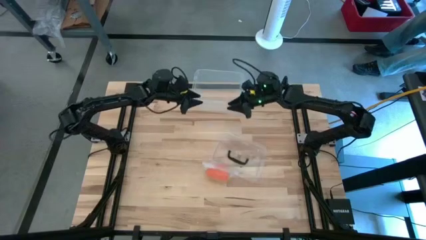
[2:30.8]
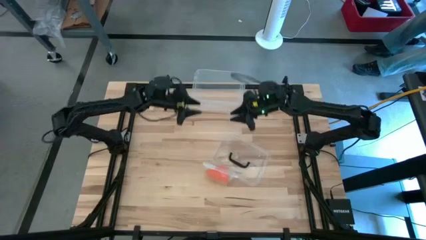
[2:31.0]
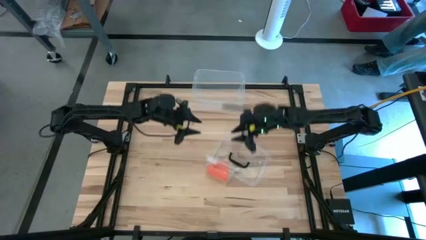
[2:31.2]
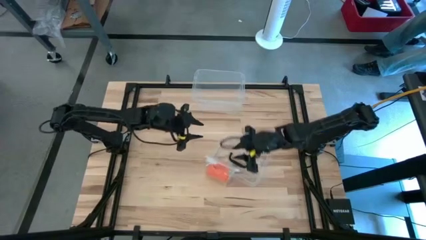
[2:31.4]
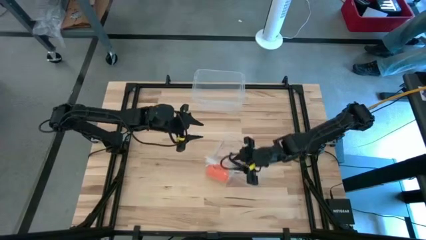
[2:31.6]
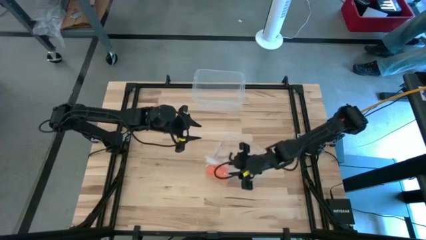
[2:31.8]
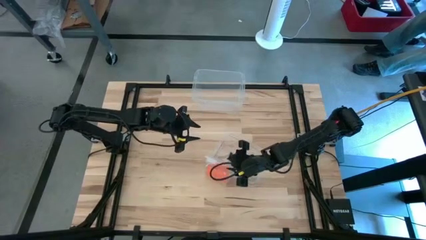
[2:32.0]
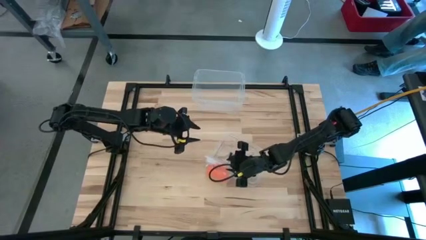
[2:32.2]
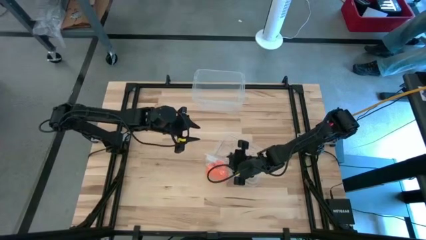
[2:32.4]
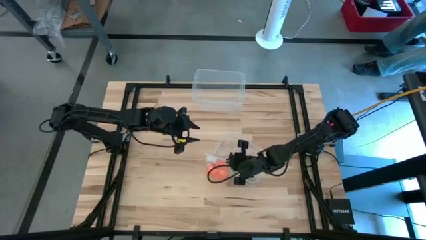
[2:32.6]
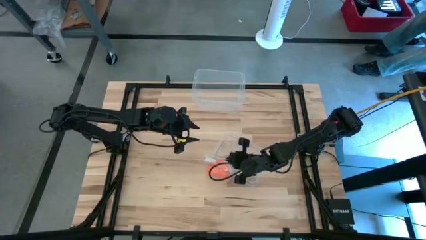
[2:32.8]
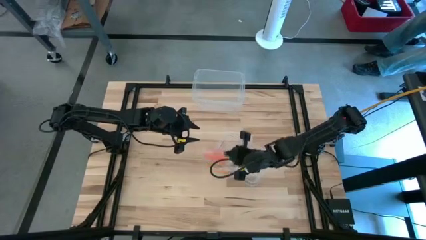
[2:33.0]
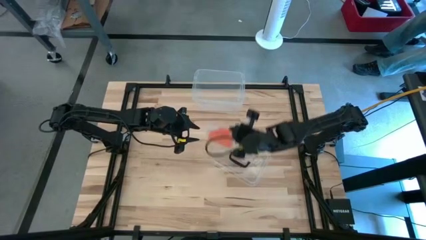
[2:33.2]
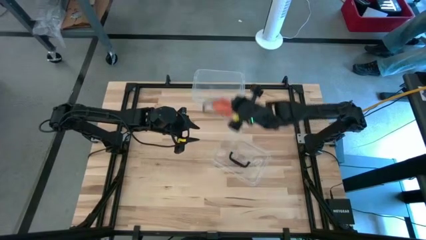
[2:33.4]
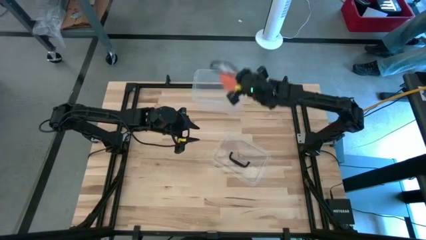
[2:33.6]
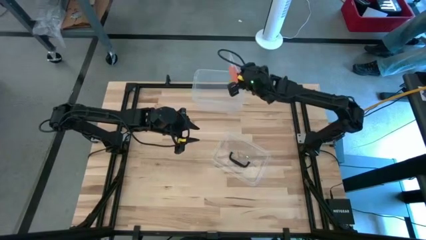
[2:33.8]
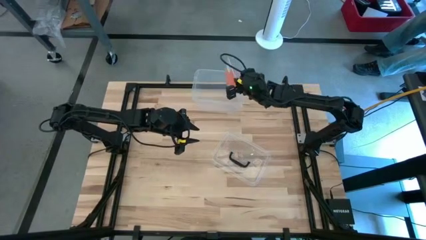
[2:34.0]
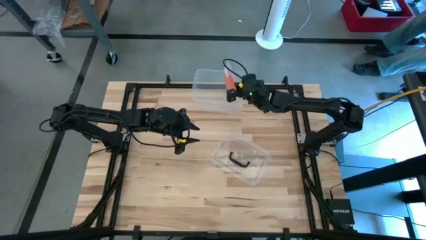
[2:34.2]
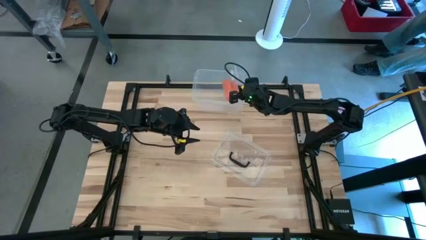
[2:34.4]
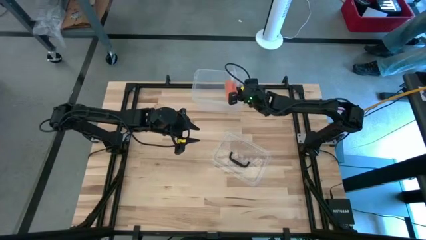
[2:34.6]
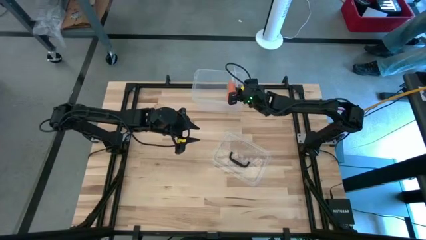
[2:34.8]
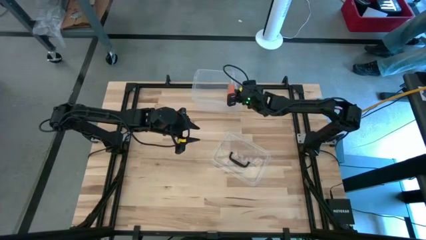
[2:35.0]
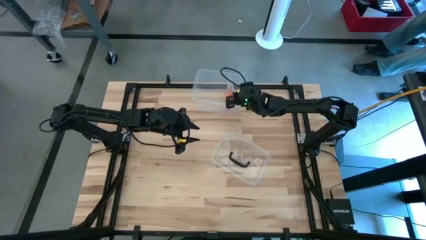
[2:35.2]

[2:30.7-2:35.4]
Task: Roll bandage
Put the package bandage into the transparent container

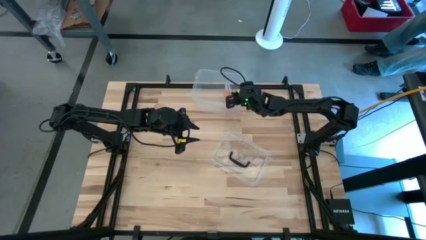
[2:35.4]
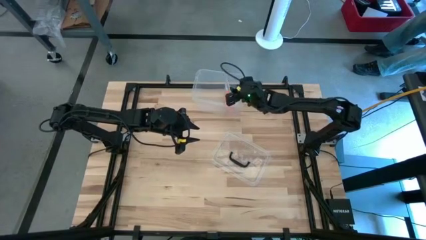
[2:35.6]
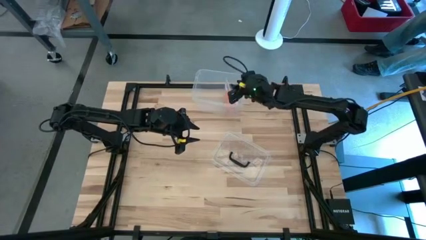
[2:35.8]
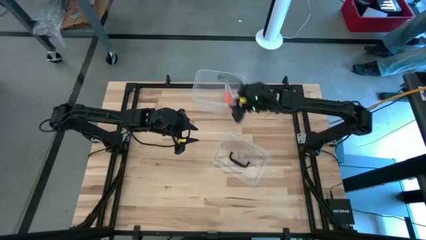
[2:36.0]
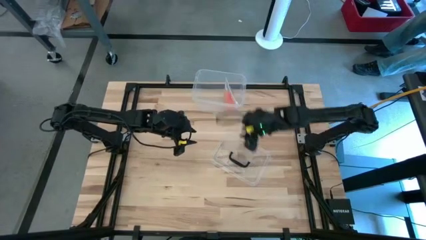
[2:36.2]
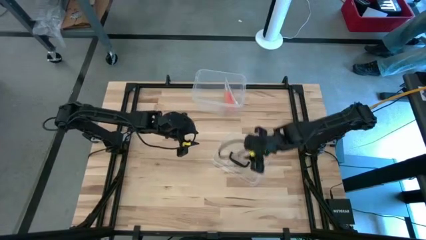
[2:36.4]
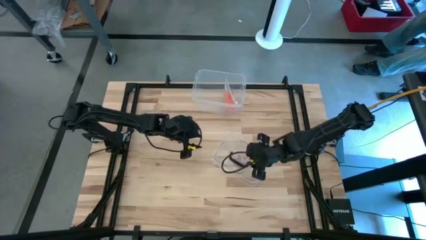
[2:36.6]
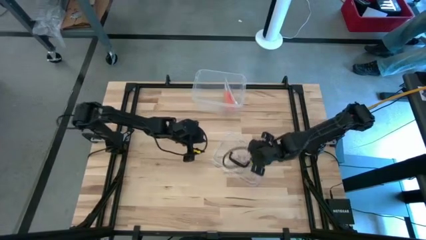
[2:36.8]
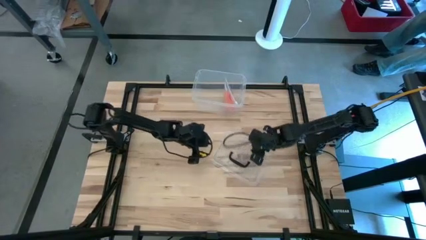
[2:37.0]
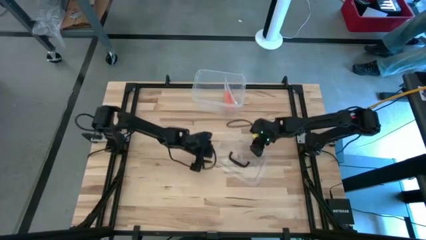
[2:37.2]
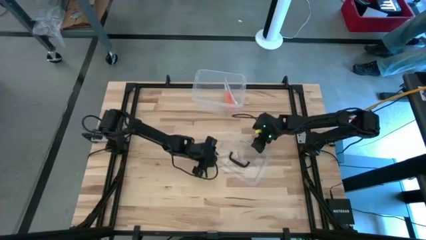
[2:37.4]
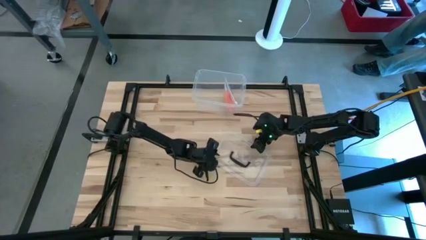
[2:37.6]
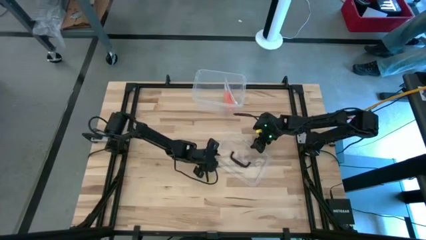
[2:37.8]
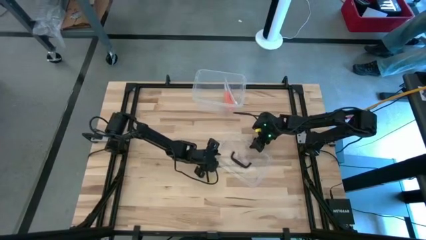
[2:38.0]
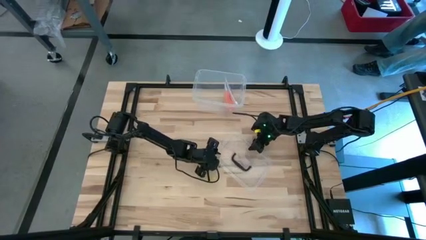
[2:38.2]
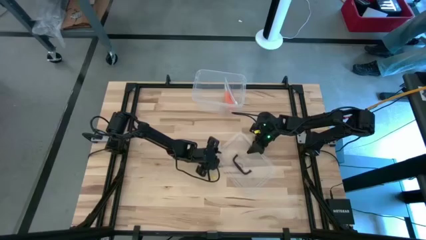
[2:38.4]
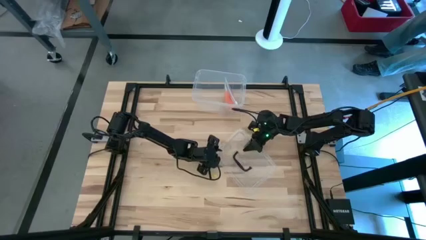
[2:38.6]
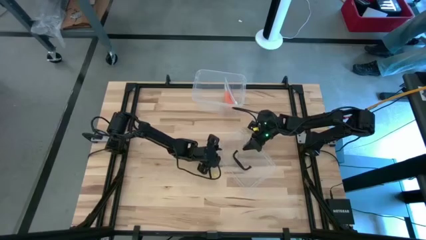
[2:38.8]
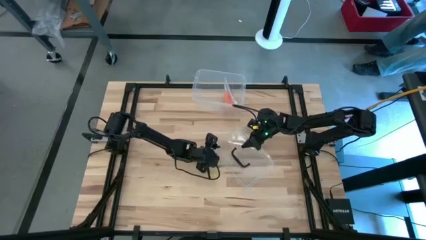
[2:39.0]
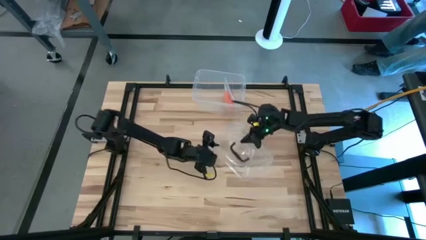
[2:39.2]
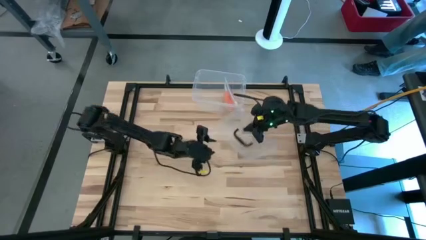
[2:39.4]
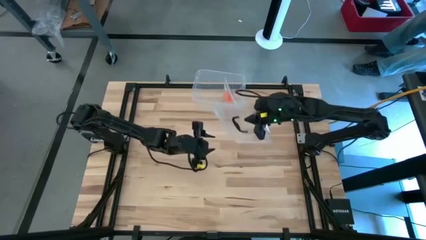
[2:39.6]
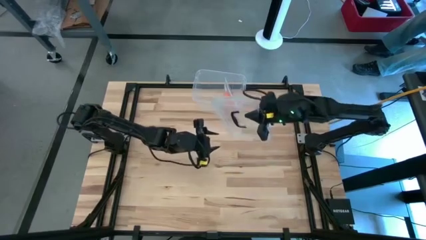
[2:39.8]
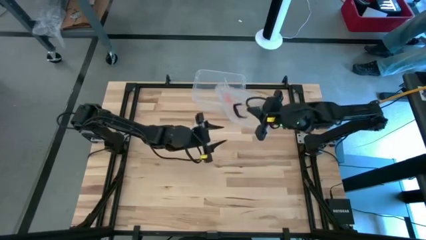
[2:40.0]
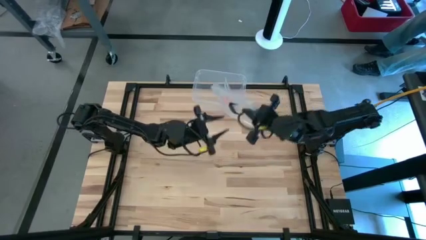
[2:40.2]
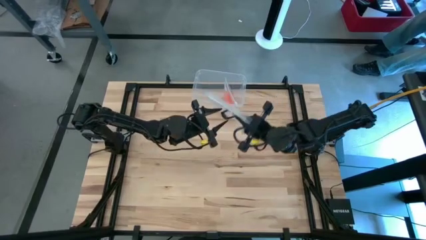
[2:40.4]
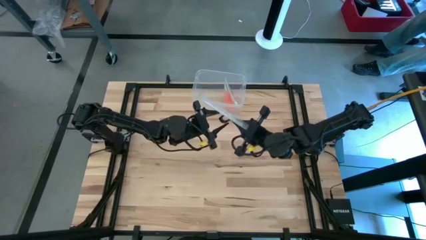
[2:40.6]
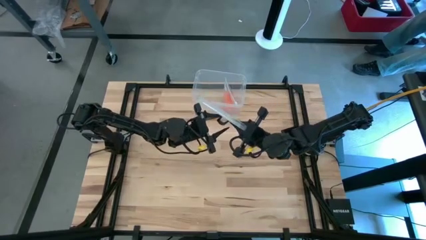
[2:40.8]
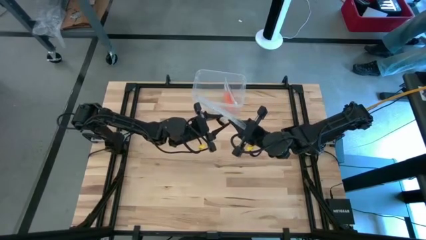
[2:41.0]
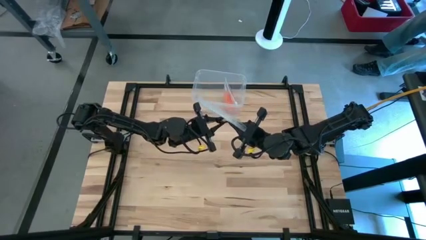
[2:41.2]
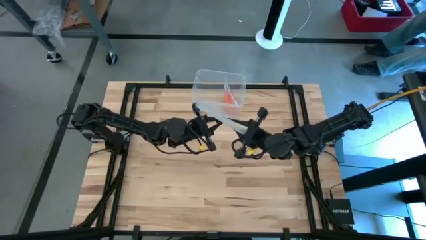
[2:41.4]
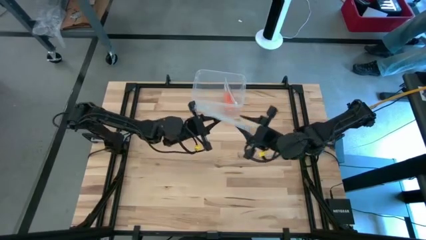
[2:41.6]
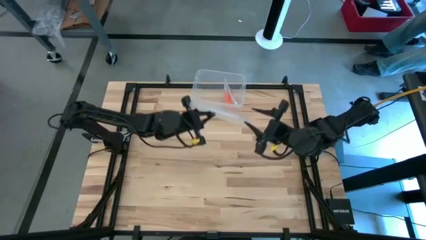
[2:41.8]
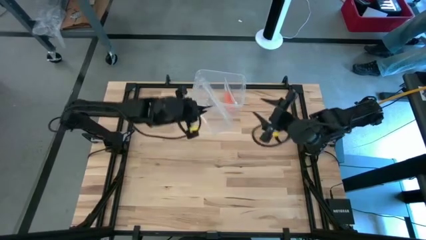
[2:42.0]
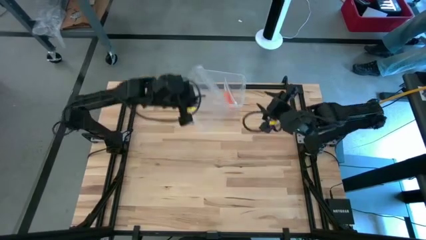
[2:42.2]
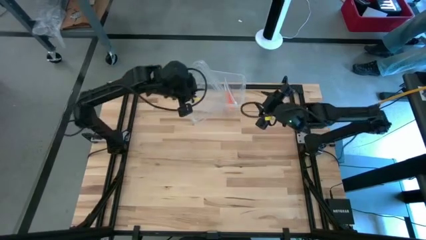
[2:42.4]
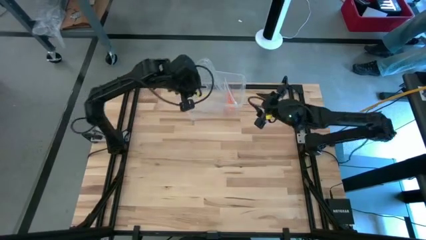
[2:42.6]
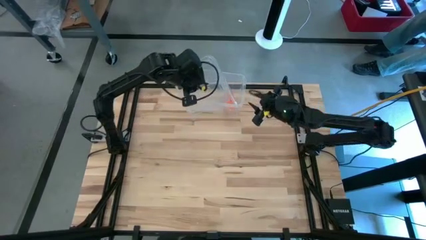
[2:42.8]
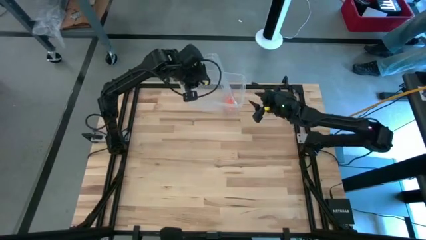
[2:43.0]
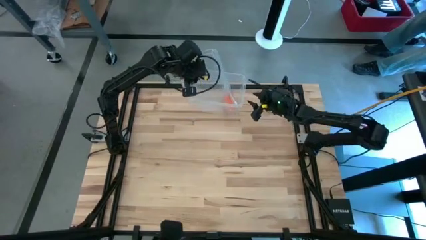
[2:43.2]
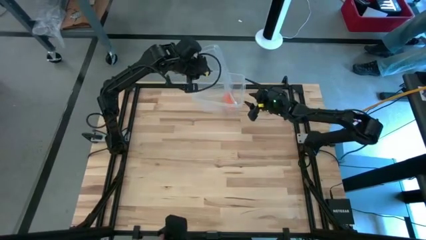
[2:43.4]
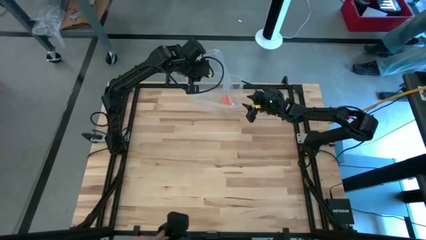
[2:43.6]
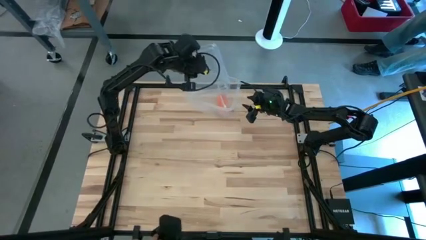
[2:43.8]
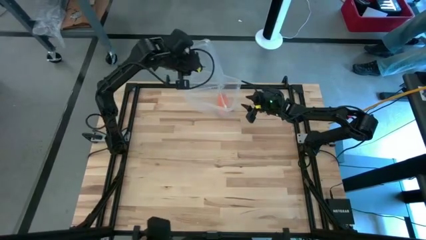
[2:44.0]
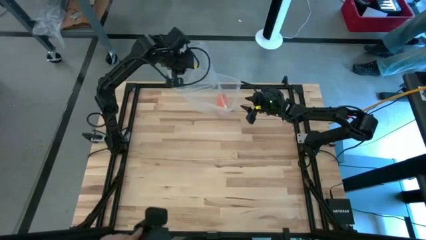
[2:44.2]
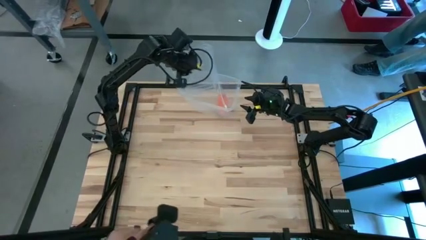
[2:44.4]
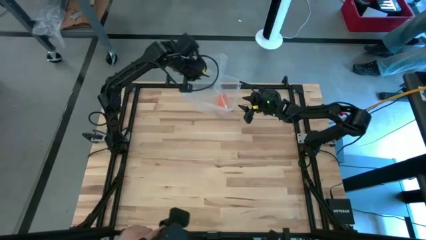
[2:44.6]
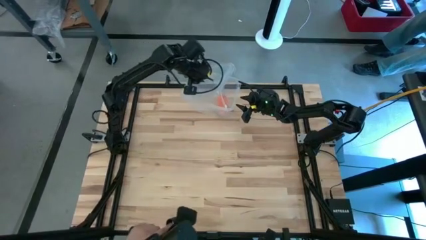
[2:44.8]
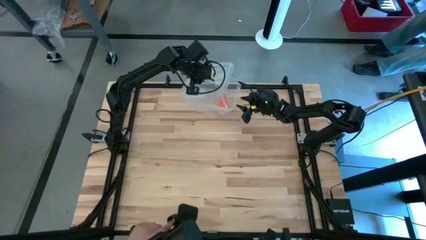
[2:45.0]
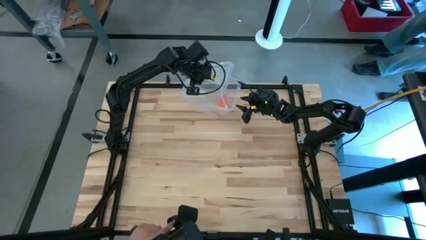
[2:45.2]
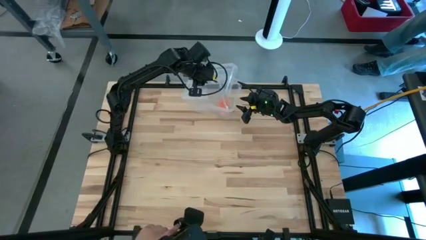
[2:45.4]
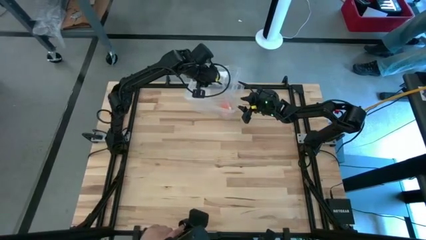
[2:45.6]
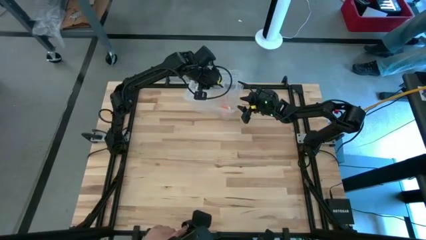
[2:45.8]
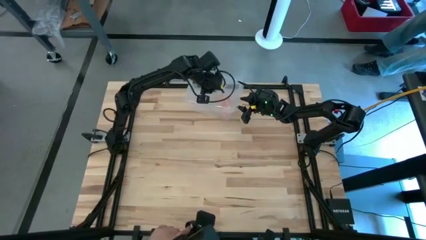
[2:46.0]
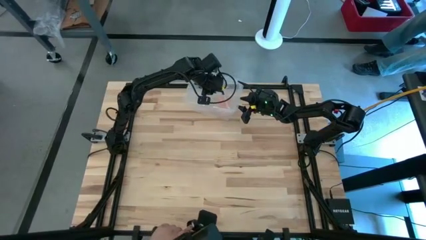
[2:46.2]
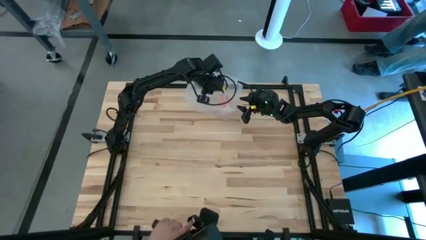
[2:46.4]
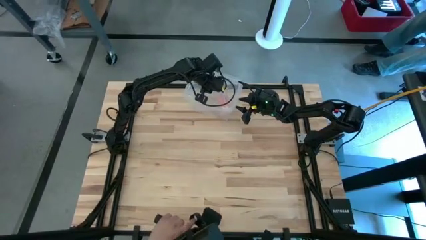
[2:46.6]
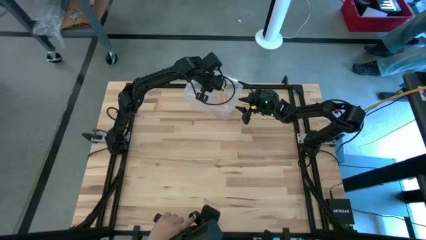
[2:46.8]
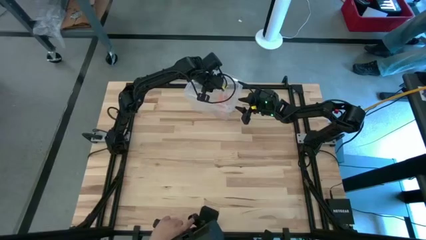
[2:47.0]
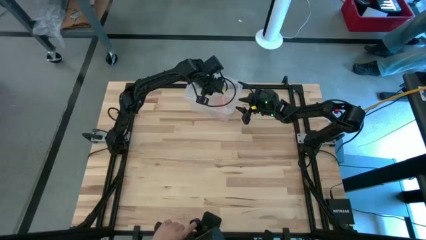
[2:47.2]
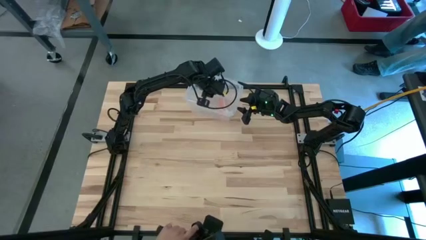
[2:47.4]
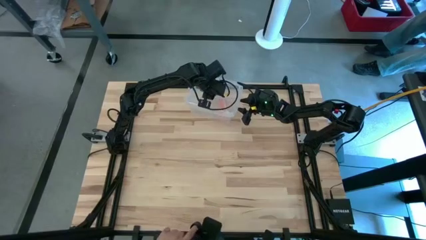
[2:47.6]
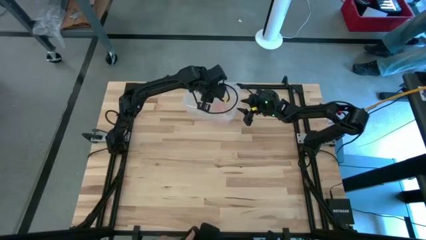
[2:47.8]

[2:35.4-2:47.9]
Close the transparent container

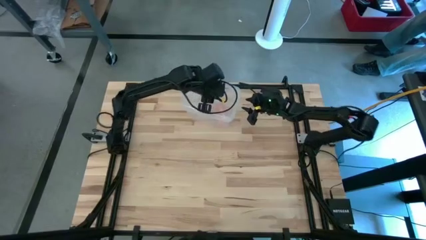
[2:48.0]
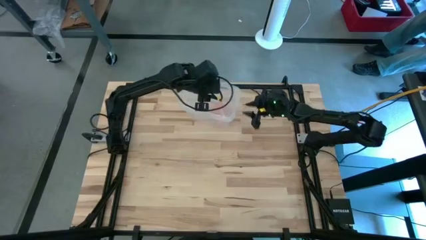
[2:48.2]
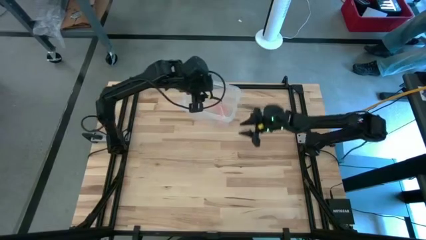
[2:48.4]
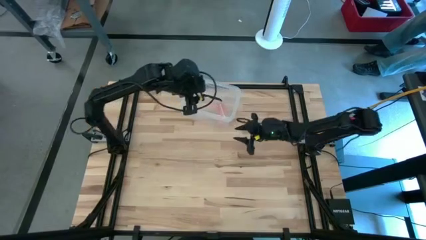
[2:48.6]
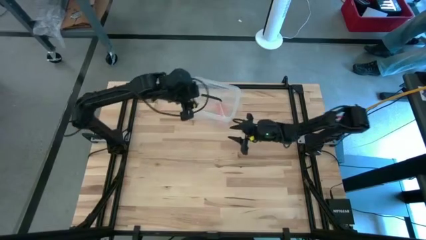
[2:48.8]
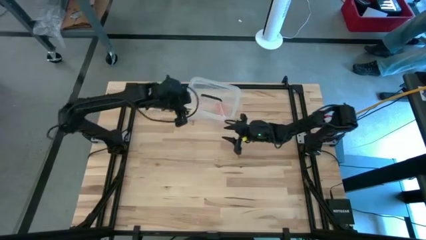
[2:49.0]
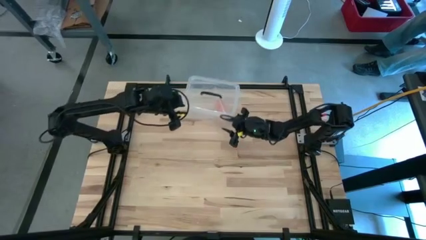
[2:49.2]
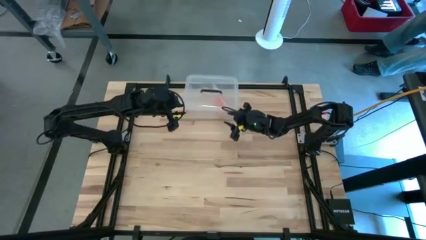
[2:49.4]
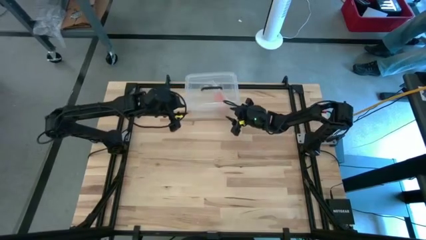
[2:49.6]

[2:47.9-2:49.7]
Adjust the transparent container
